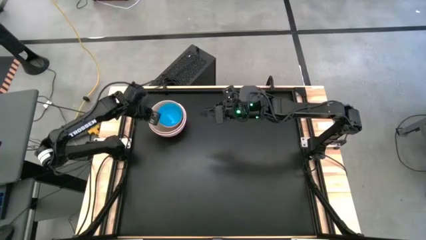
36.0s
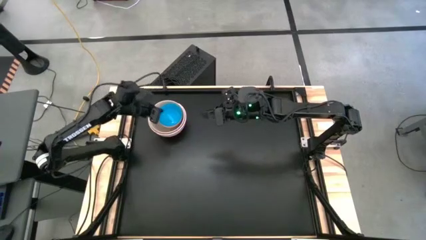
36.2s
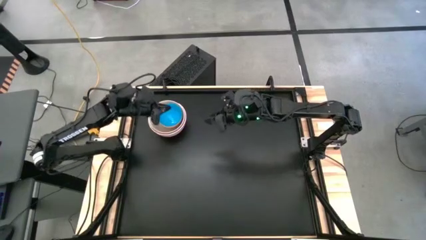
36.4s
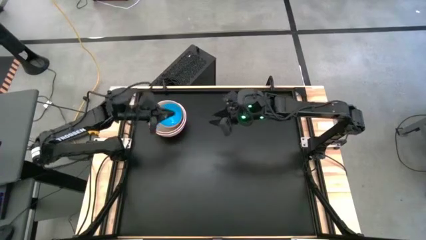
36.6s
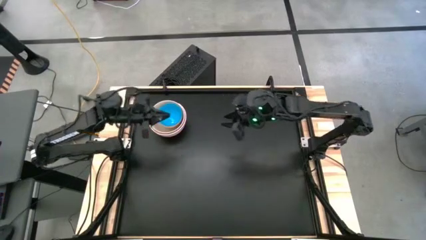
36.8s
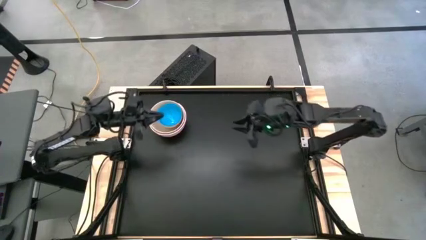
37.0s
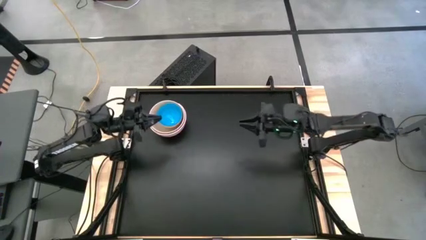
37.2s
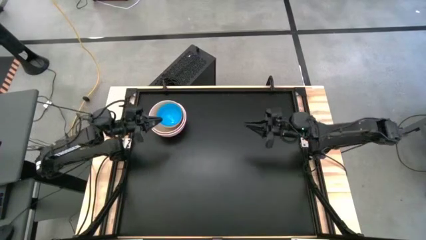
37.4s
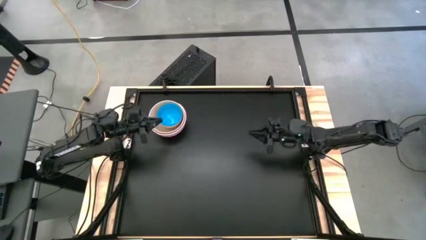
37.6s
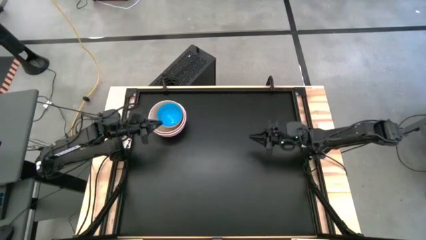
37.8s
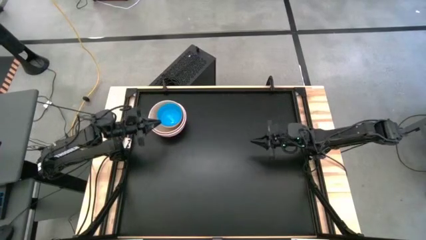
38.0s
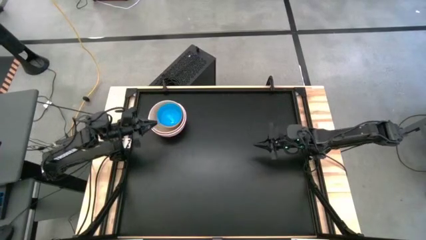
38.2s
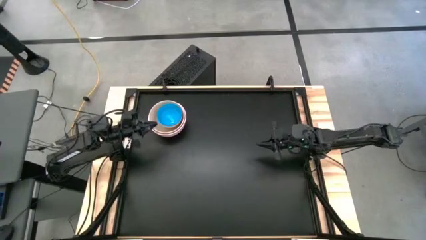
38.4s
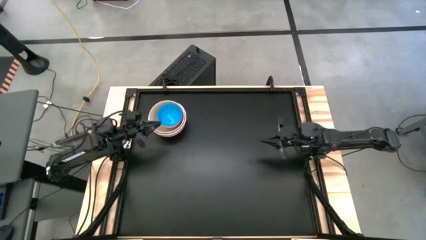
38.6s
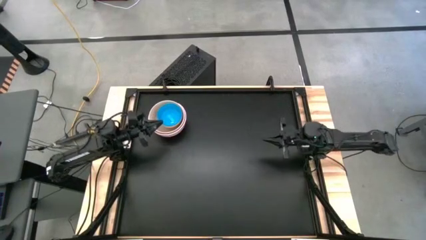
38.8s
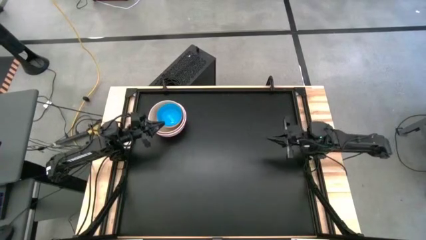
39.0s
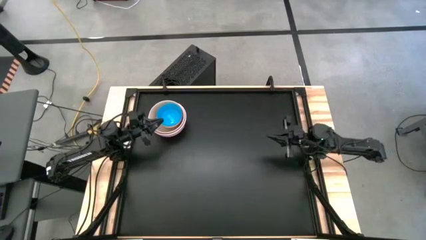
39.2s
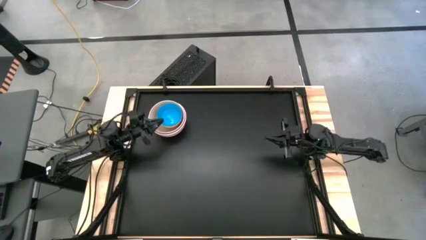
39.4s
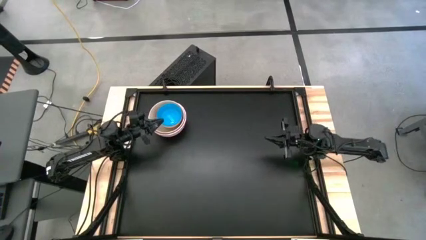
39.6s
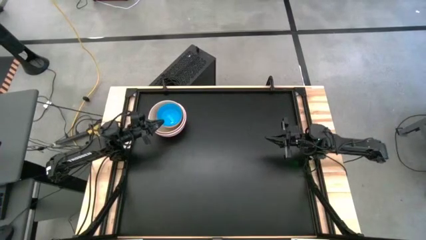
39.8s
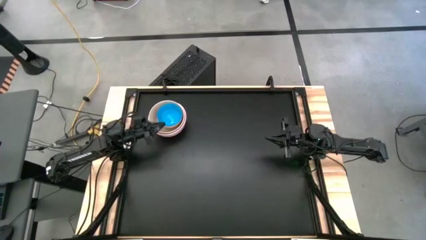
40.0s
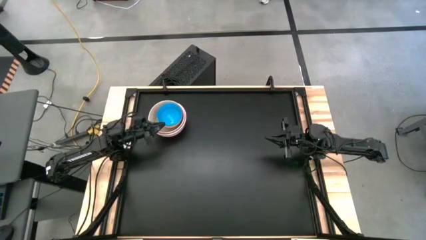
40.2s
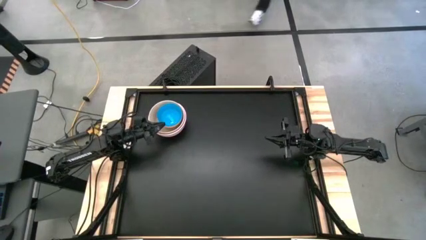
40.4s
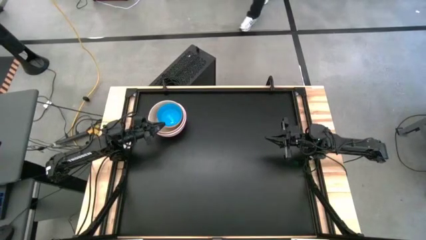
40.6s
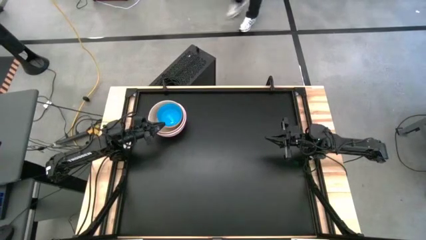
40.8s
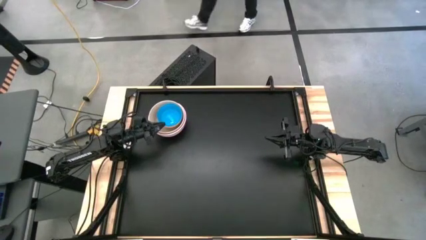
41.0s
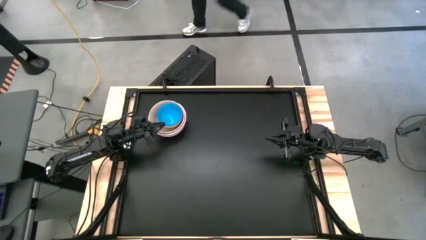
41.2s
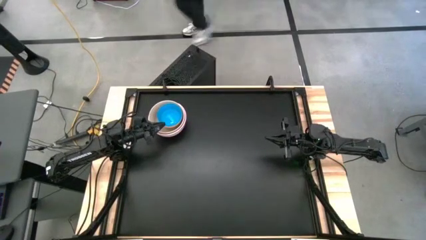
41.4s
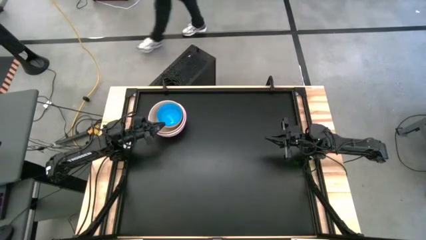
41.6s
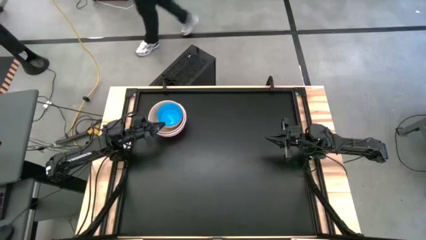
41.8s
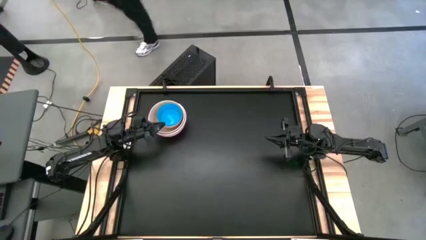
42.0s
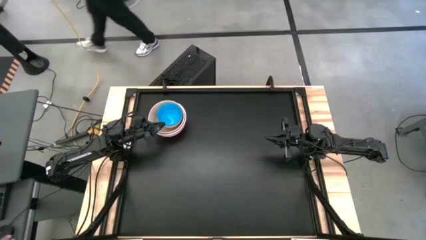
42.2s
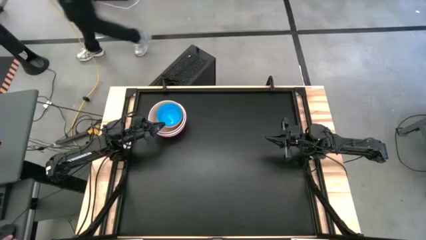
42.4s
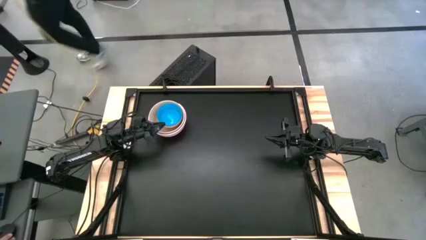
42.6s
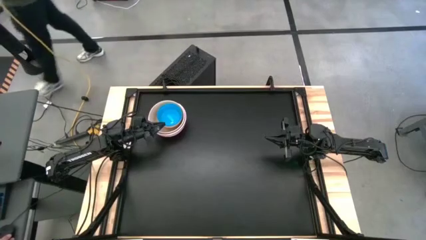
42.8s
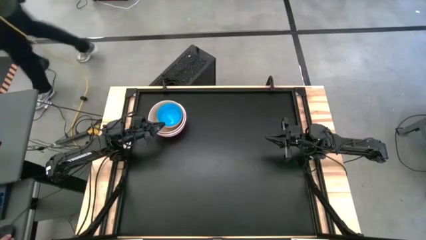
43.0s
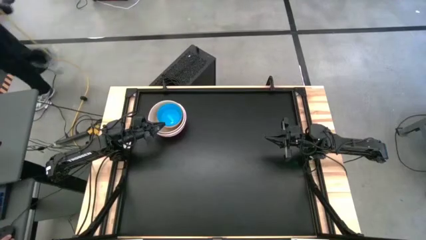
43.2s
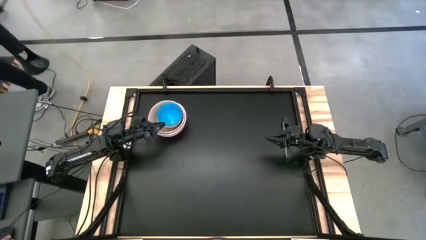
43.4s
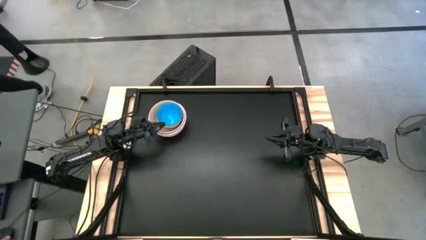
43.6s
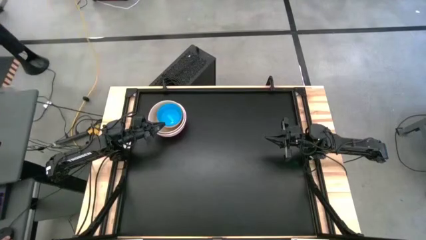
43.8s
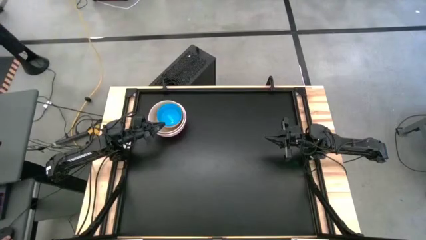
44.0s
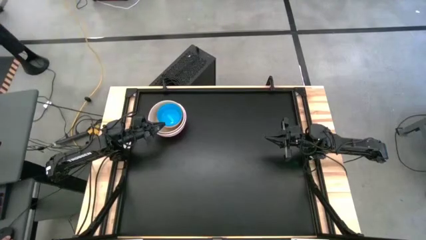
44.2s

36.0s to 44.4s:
Return to Home Position

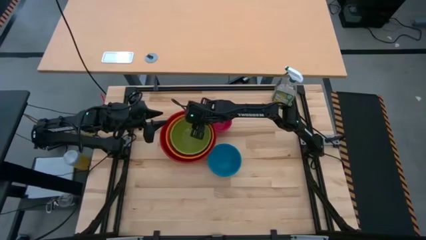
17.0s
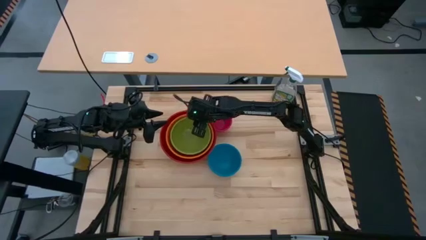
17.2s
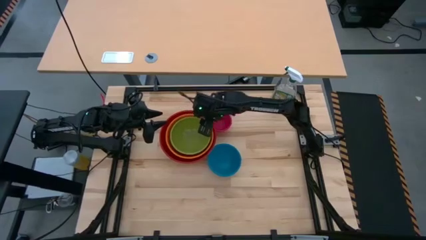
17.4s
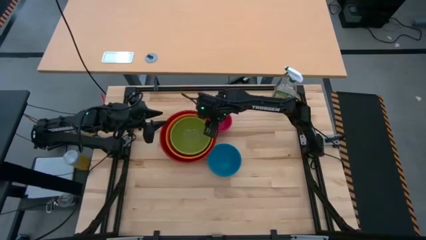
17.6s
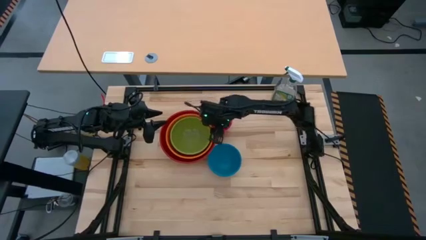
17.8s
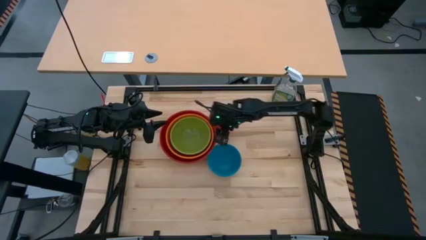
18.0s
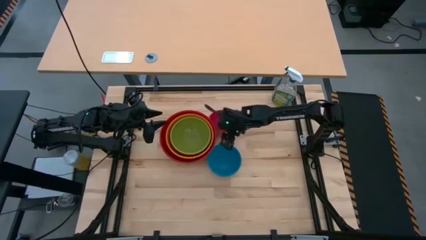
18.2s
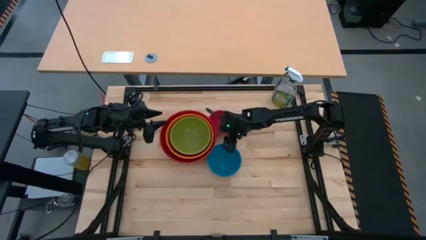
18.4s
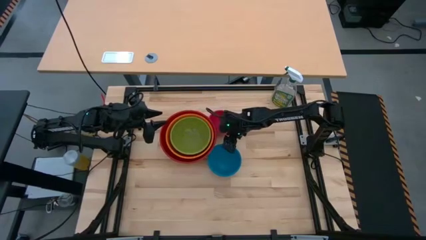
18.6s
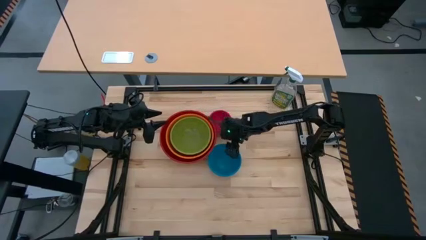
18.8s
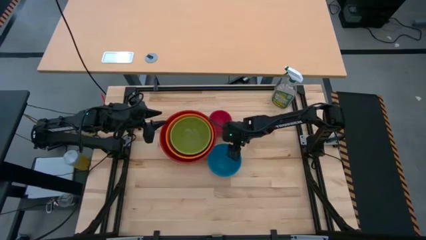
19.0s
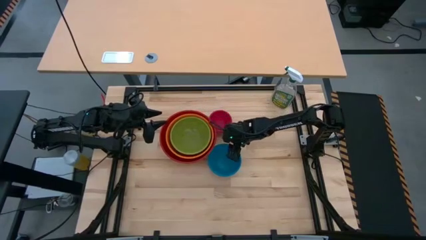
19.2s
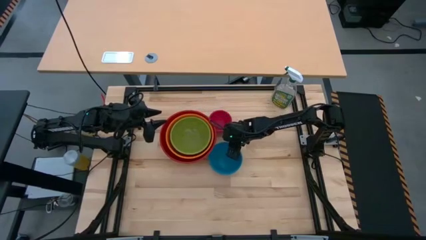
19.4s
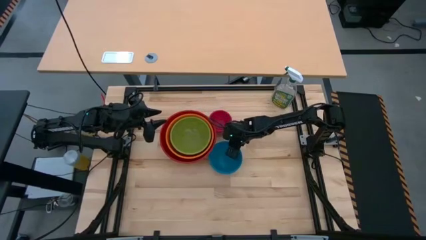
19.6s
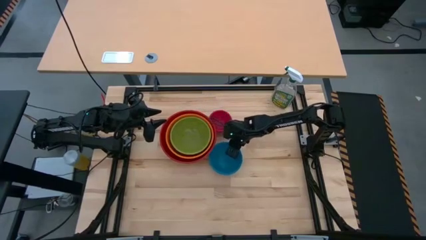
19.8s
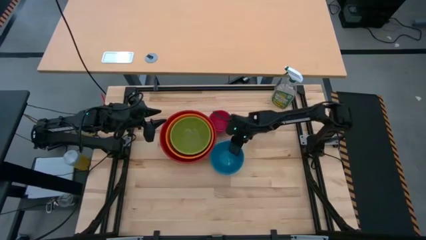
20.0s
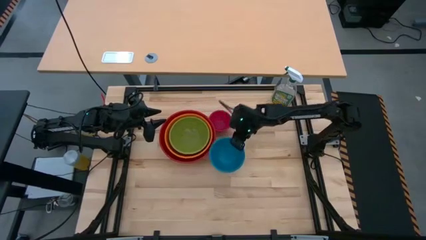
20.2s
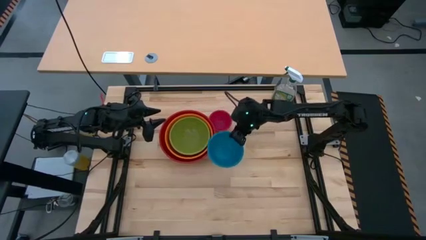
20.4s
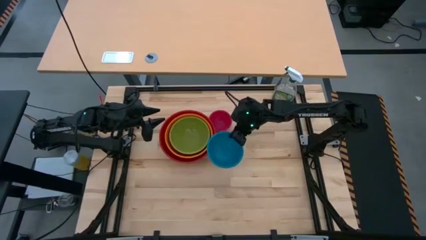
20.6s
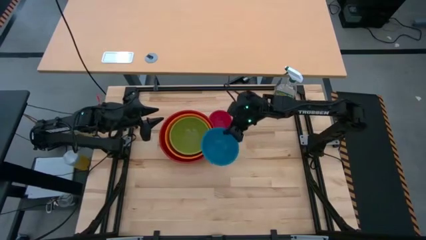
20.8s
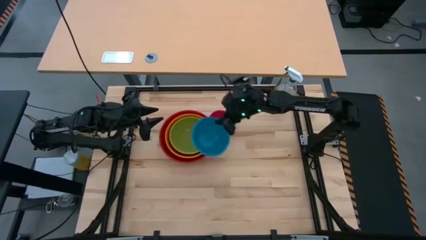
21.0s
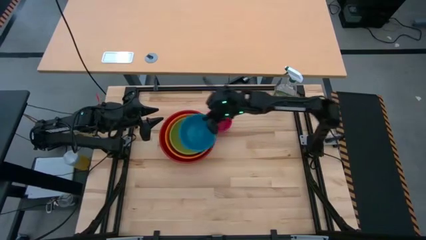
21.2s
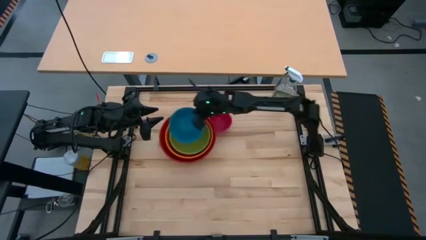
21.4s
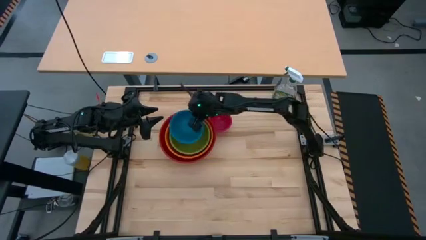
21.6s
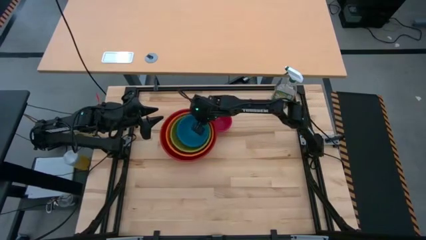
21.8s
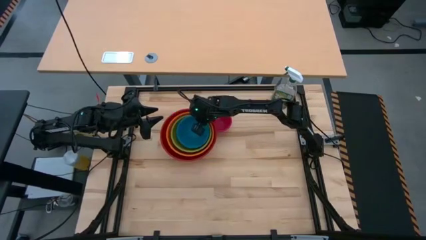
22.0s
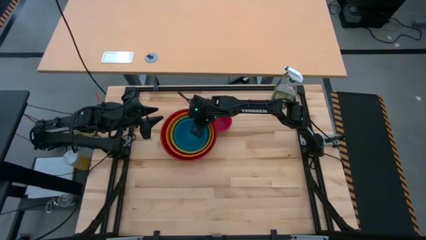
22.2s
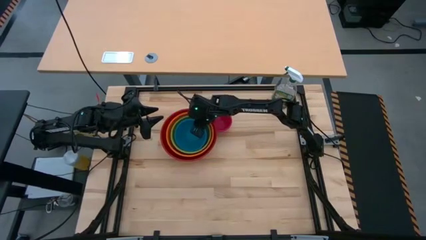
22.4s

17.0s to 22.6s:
Stack the blue bowl on top of the green bowl
